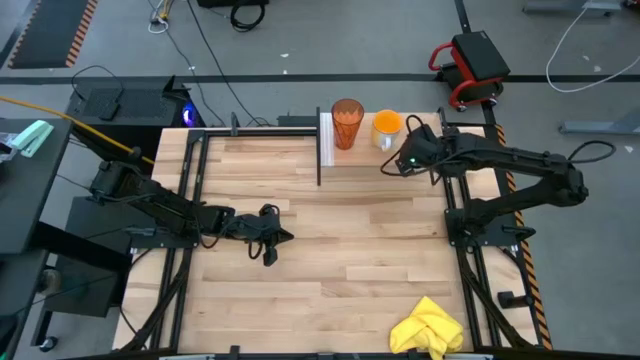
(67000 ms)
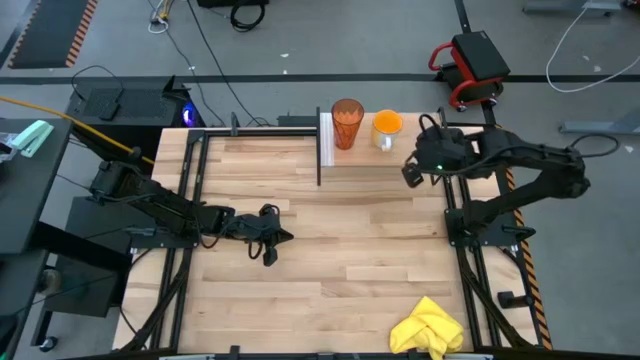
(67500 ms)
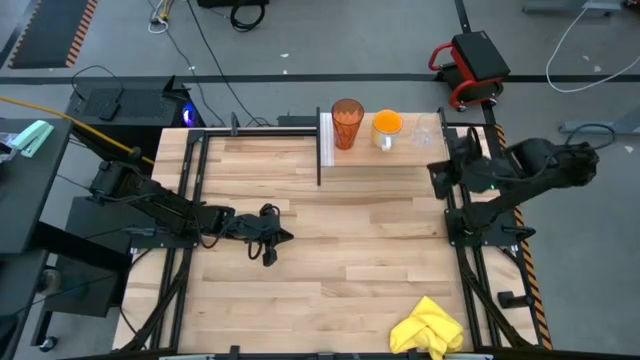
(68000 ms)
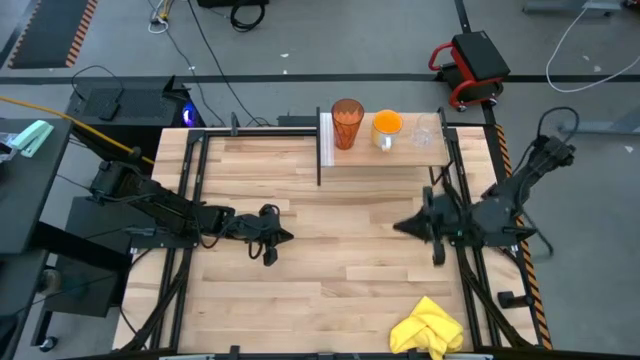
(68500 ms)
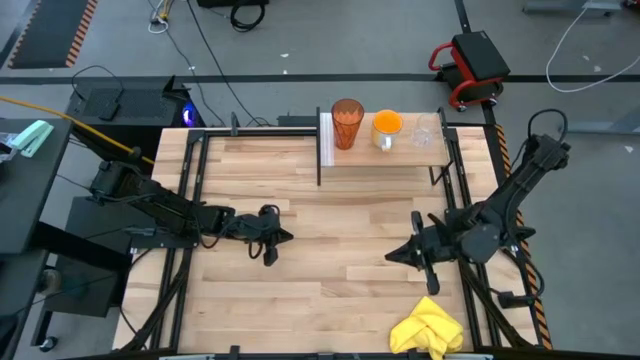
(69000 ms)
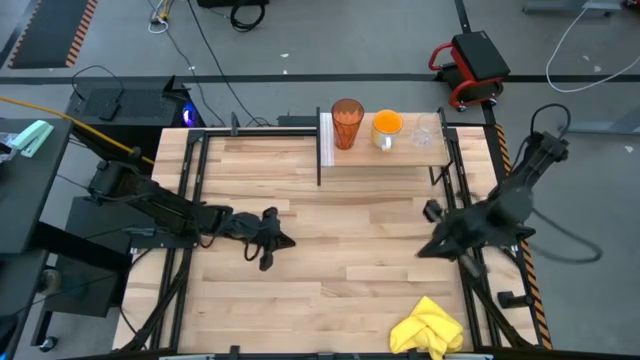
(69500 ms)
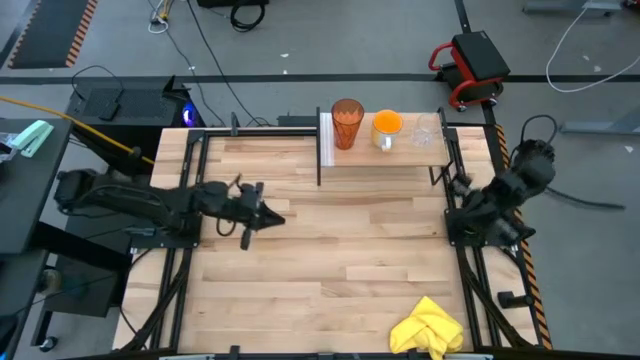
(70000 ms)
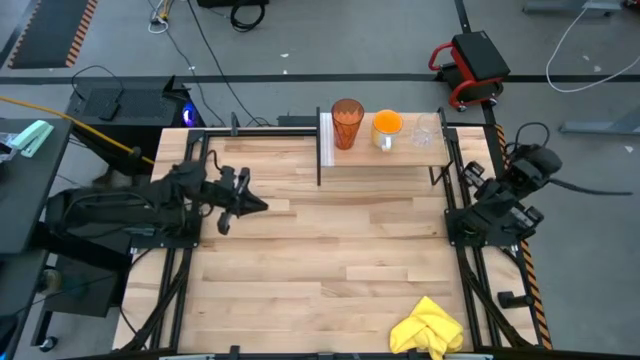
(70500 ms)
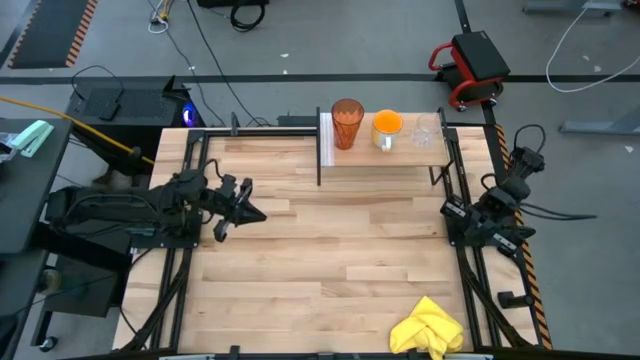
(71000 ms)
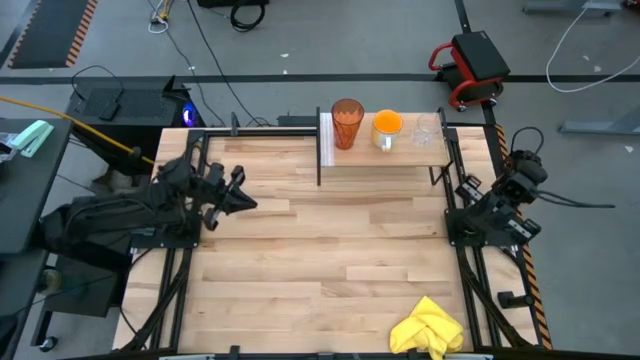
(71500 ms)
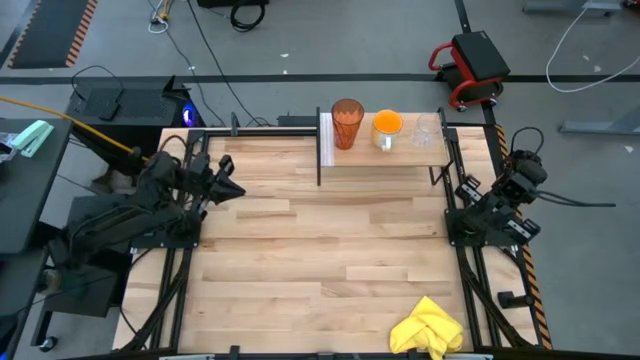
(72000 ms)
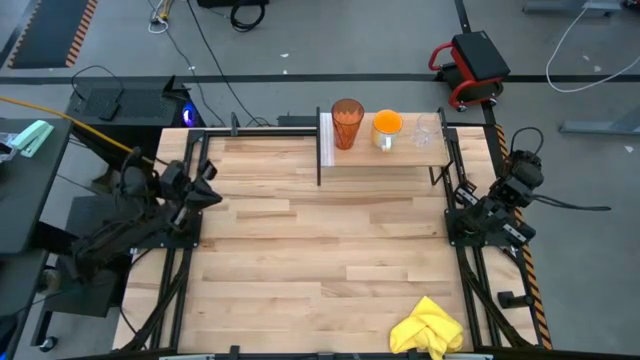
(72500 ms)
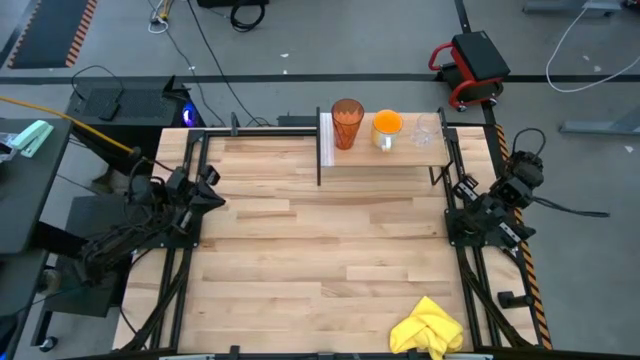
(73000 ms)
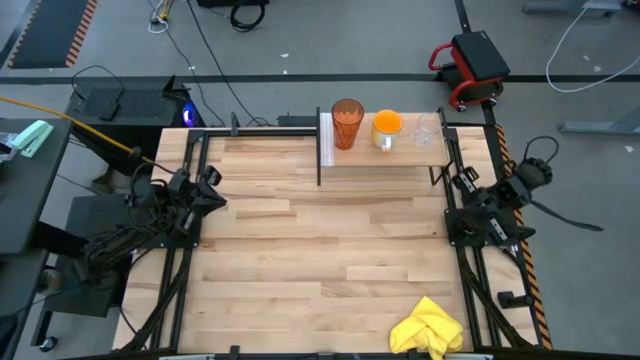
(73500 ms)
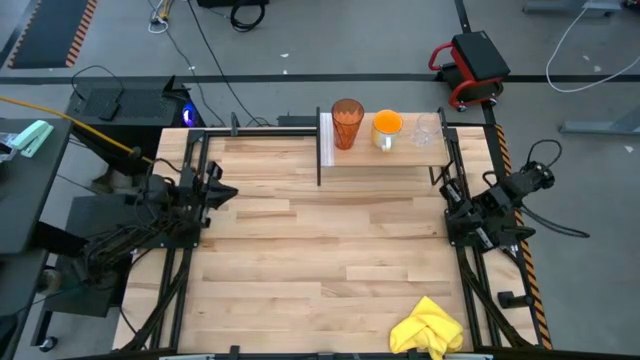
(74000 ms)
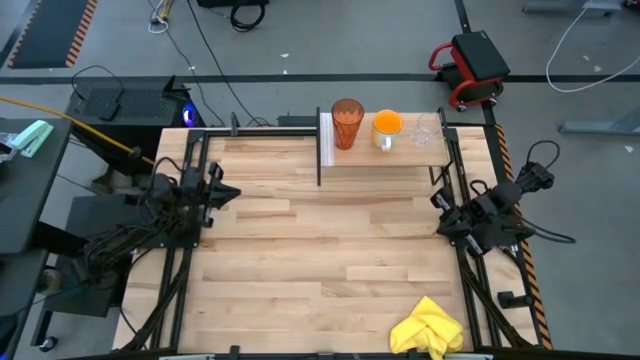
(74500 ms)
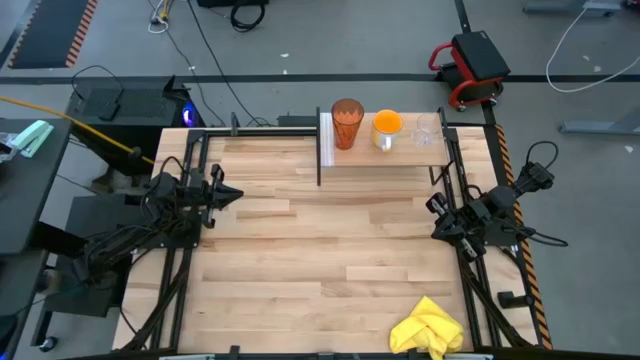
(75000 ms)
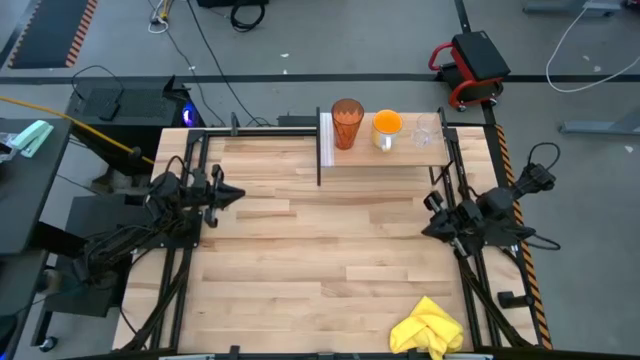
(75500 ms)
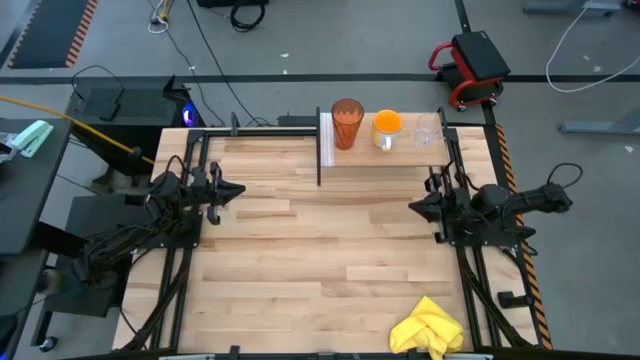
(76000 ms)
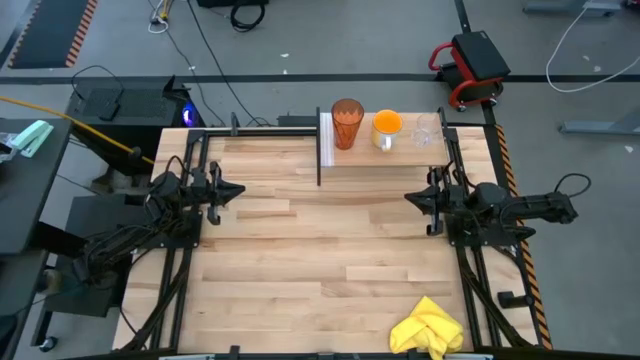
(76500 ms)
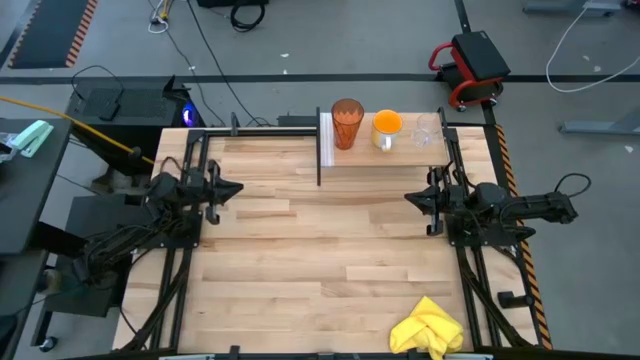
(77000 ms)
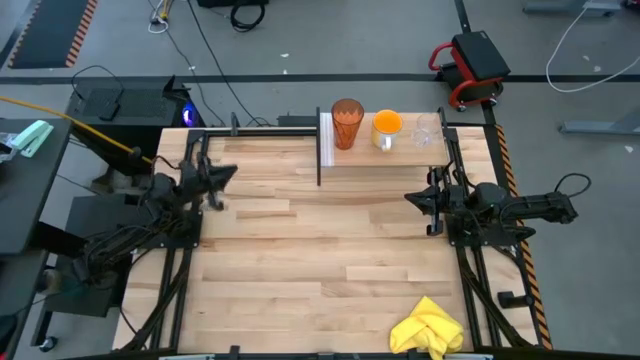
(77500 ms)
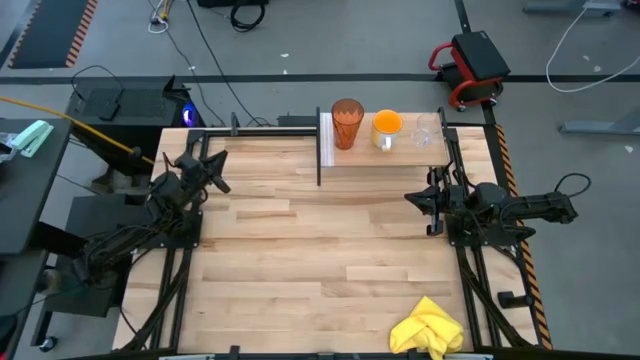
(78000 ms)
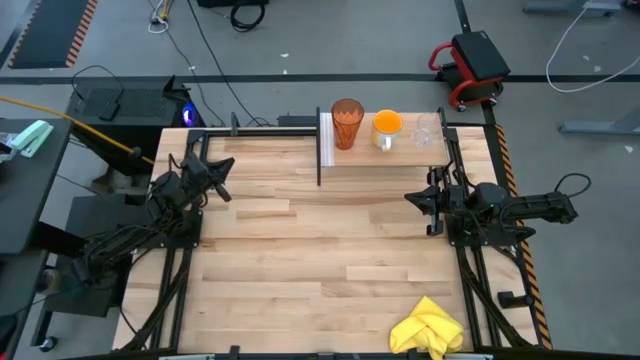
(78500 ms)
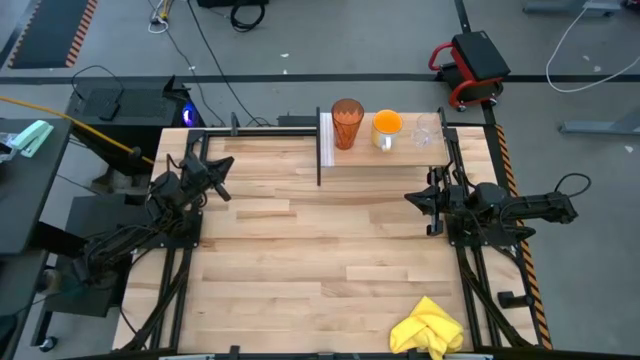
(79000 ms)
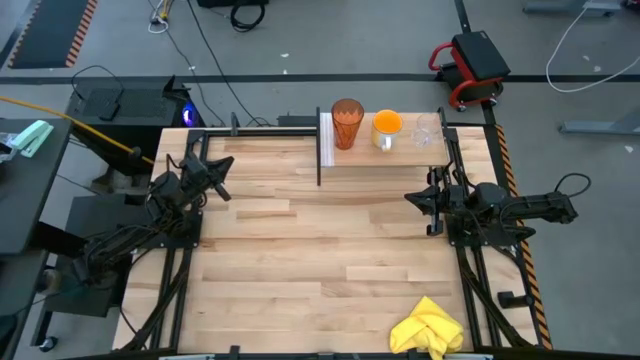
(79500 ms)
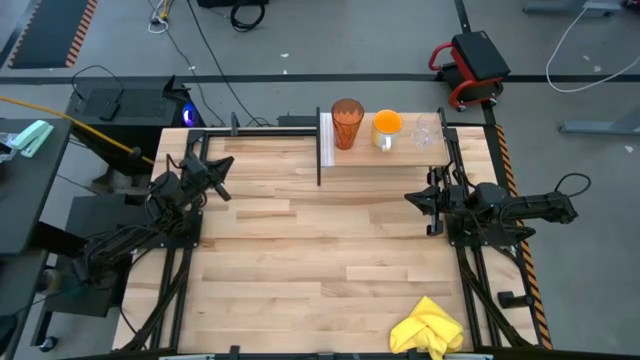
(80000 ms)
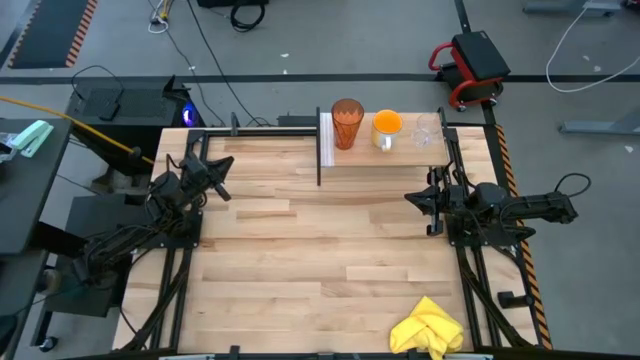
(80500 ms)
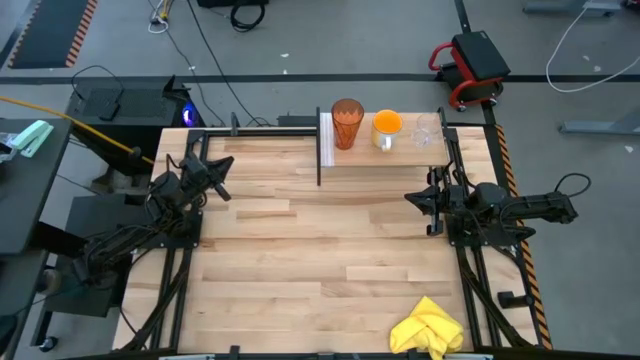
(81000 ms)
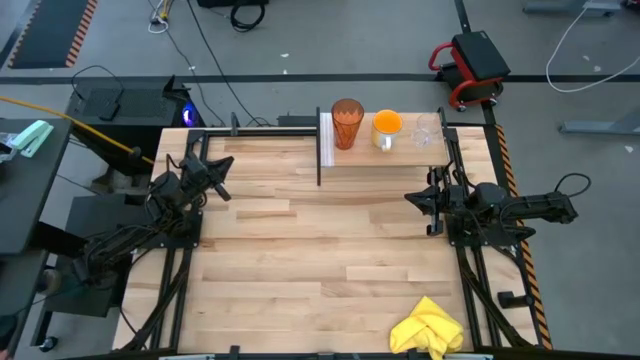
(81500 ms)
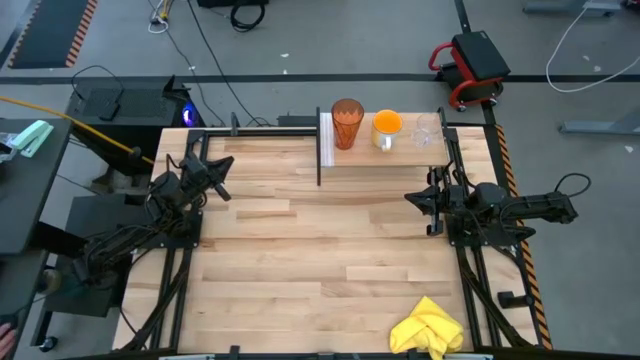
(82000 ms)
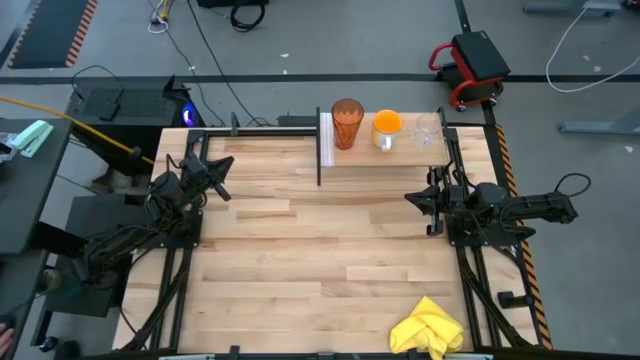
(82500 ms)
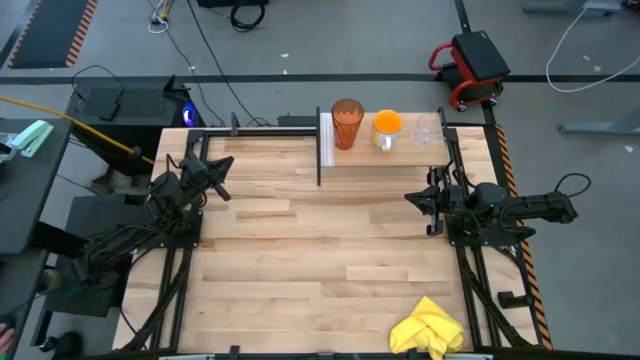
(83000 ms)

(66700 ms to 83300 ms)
Task: Stack small to large cups/mugs on shelf
Return to Home Position

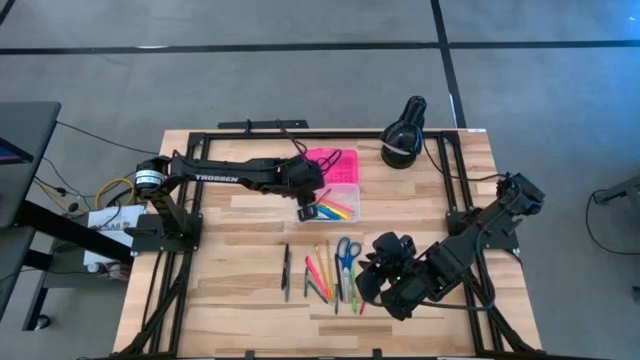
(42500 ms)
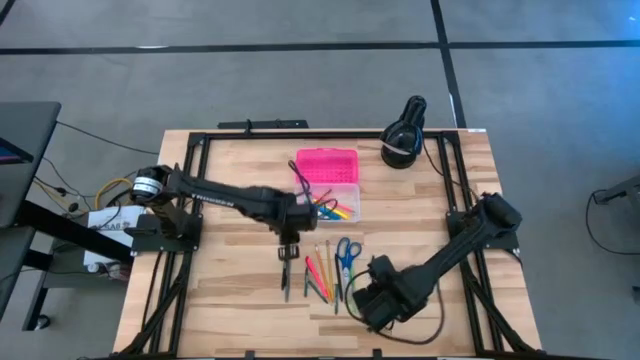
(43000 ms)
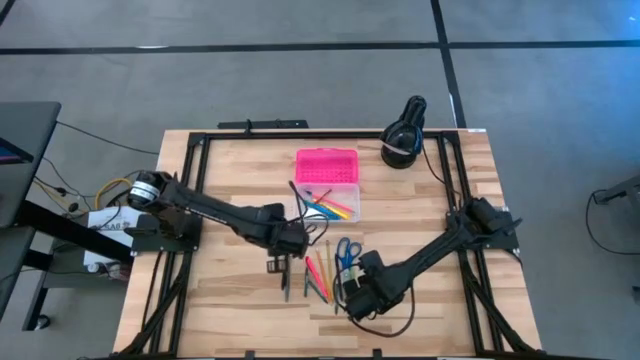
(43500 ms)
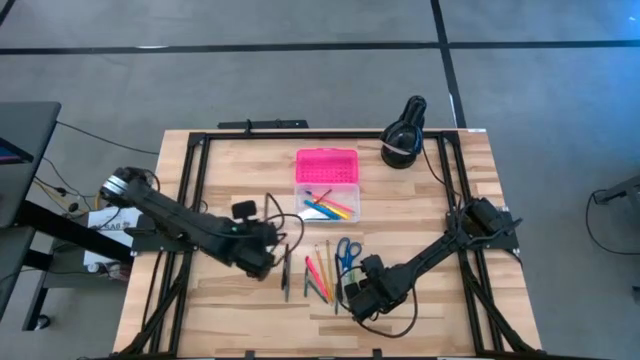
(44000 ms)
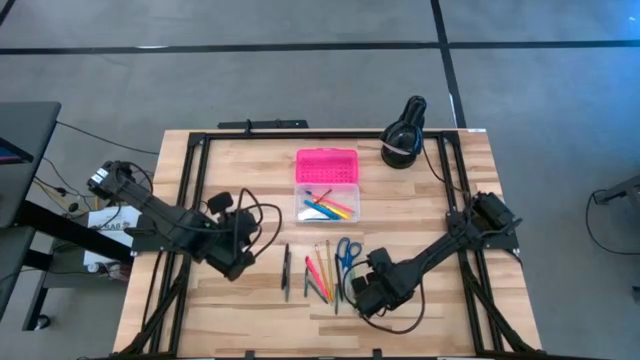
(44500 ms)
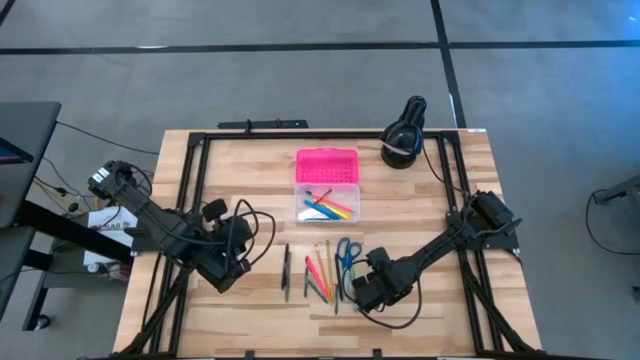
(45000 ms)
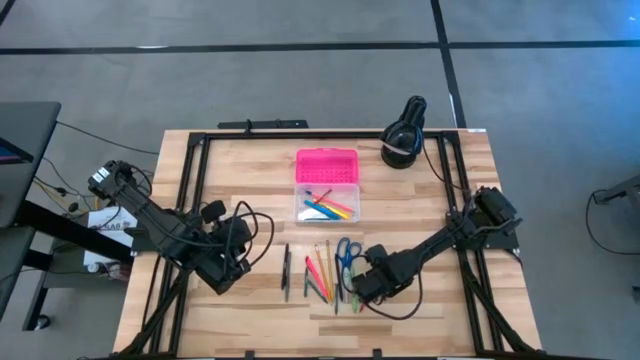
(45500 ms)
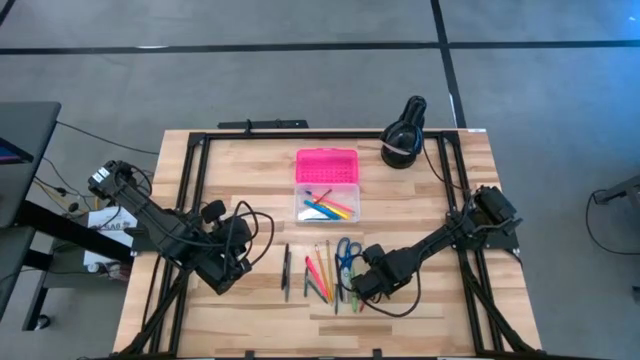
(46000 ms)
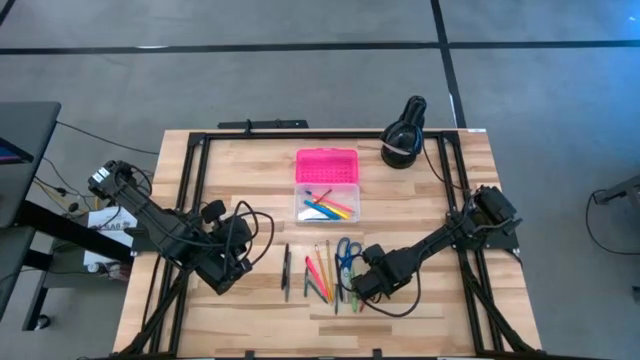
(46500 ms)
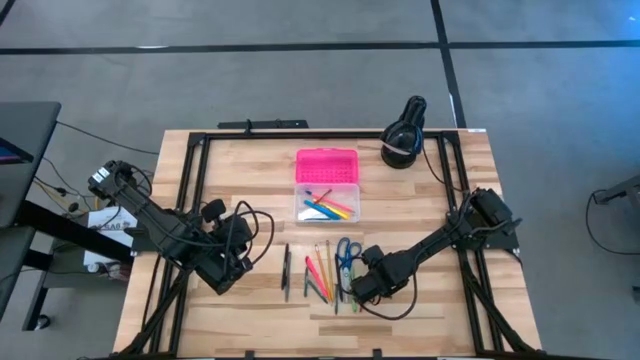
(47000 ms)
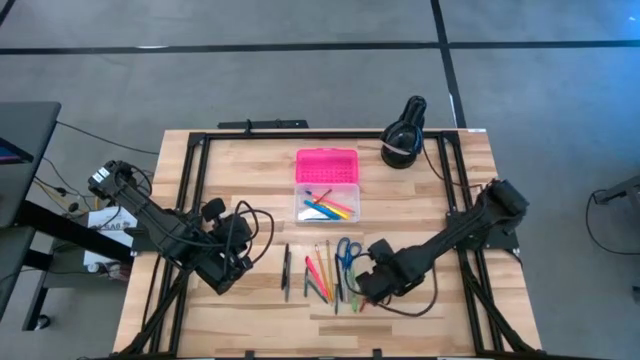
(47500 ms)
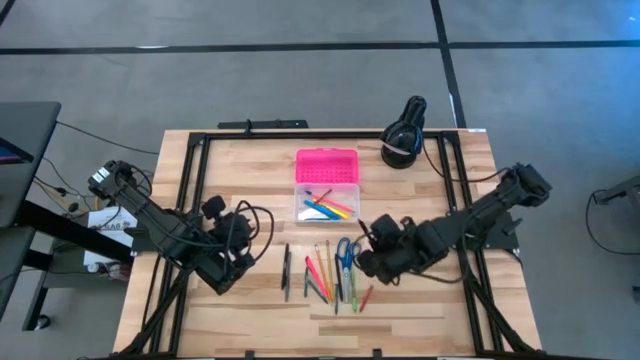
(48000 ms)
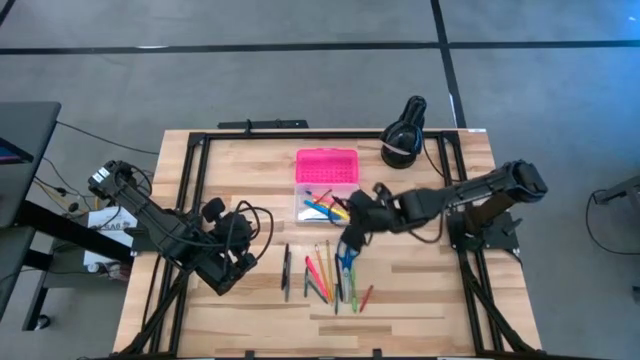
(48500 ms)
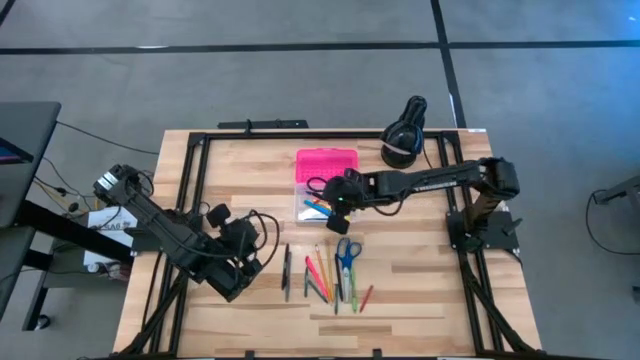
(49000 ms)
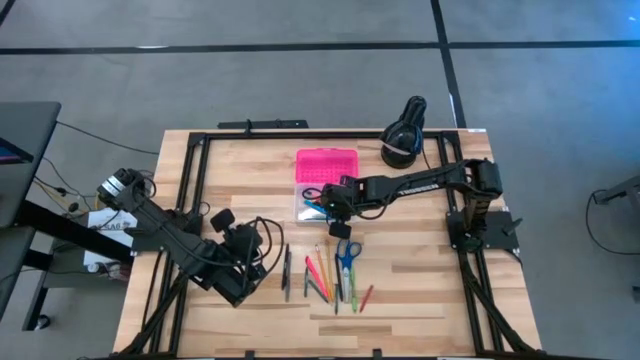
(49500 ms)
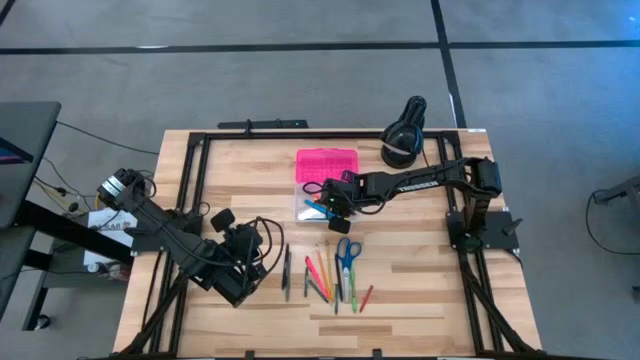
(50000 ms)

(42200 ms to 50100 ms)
Task: Pick & place school supplies into a supply box
Put the black pen into the pink supply box
